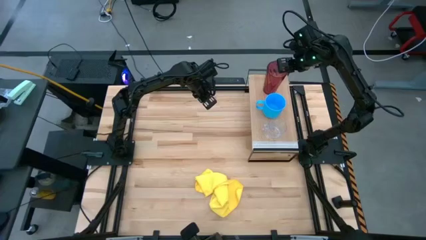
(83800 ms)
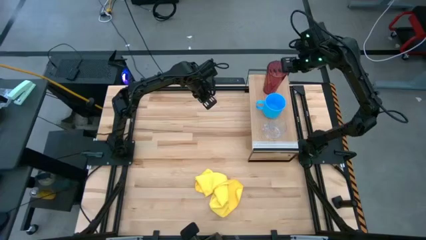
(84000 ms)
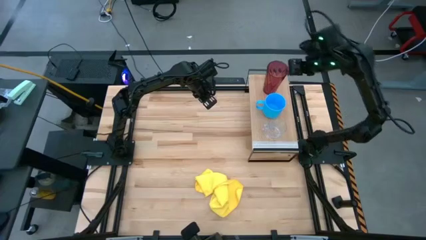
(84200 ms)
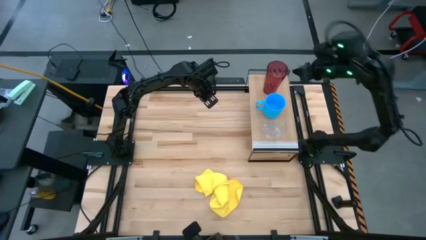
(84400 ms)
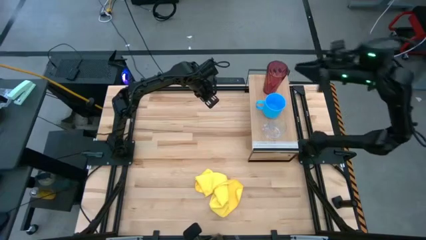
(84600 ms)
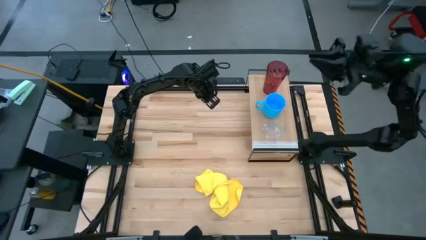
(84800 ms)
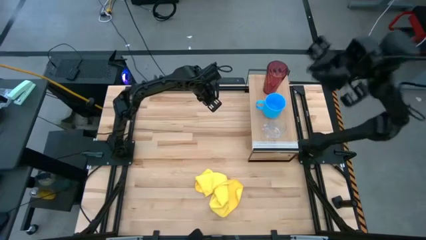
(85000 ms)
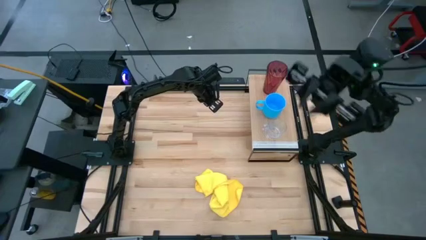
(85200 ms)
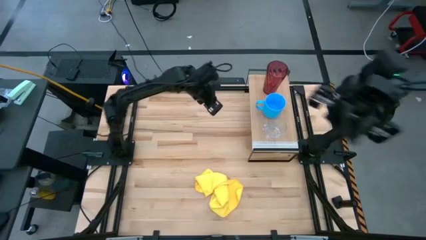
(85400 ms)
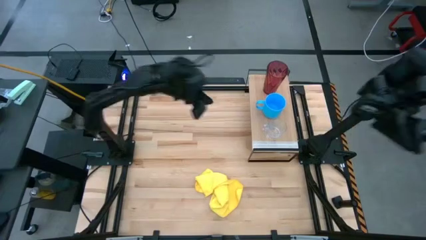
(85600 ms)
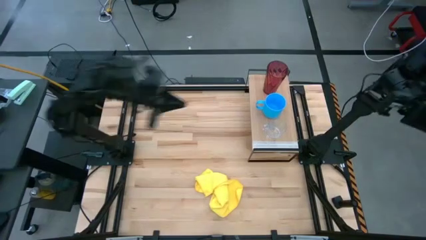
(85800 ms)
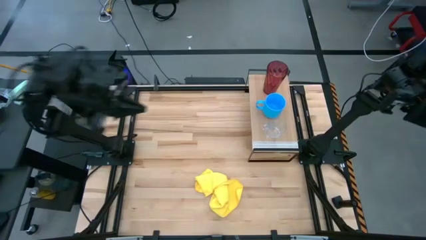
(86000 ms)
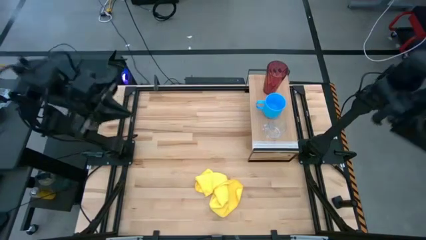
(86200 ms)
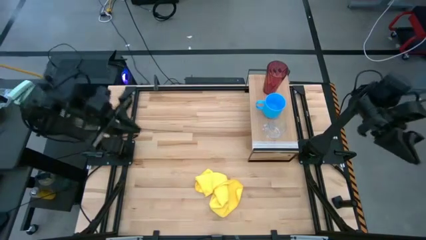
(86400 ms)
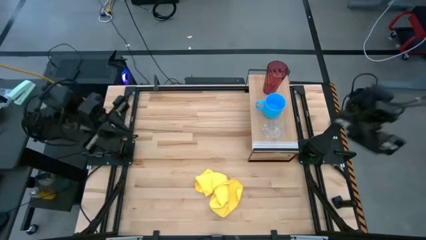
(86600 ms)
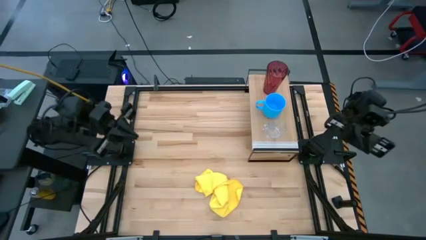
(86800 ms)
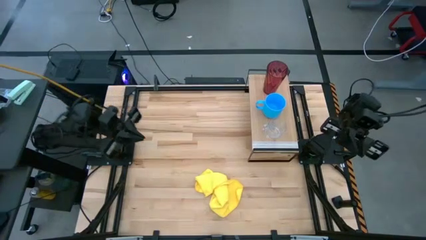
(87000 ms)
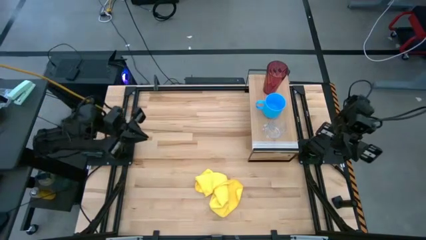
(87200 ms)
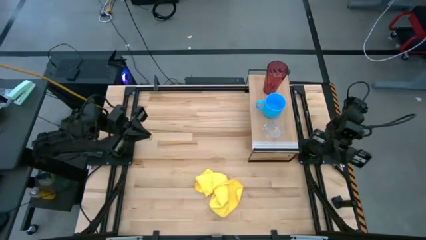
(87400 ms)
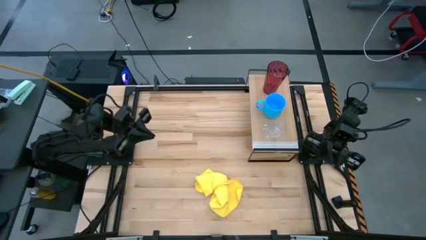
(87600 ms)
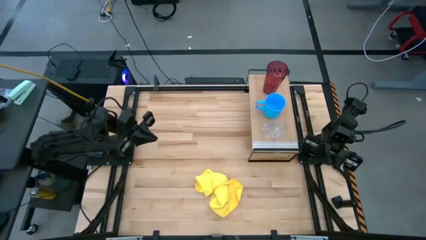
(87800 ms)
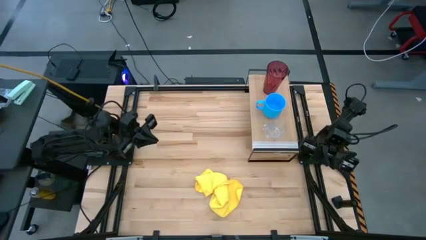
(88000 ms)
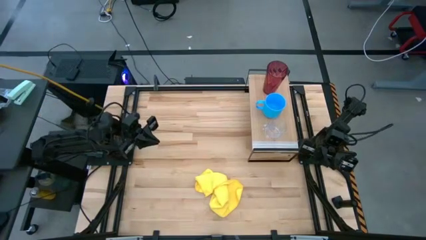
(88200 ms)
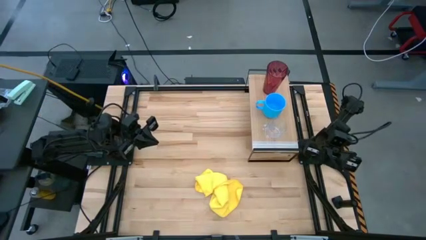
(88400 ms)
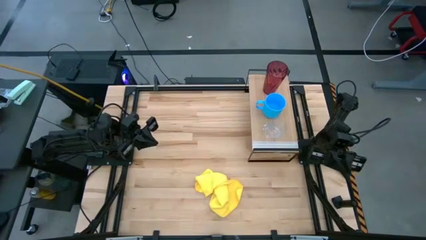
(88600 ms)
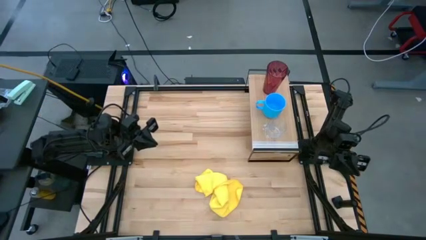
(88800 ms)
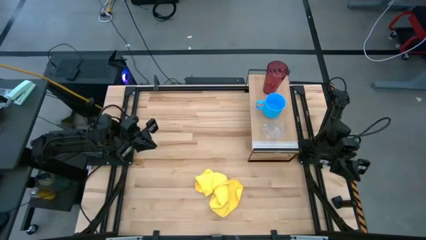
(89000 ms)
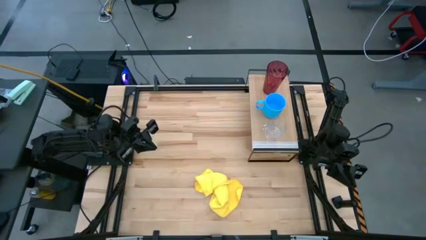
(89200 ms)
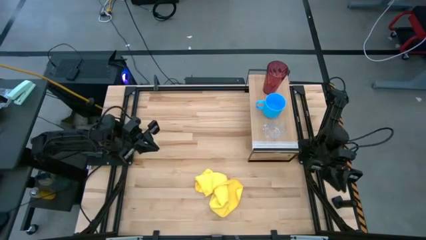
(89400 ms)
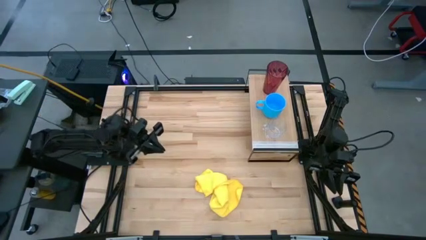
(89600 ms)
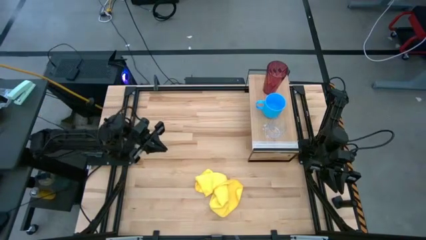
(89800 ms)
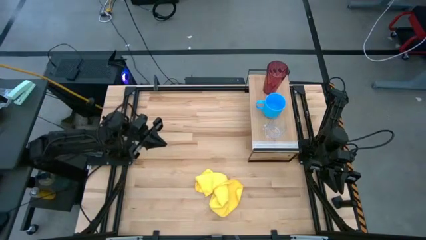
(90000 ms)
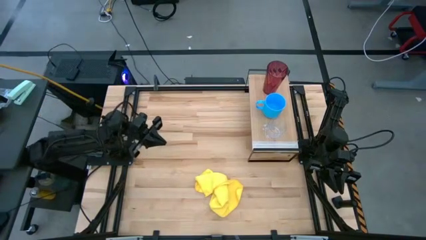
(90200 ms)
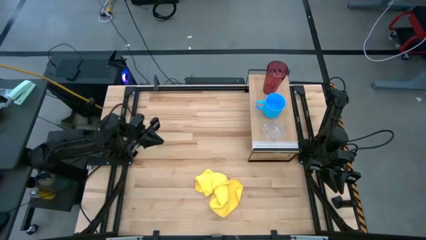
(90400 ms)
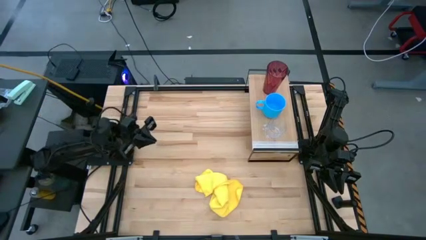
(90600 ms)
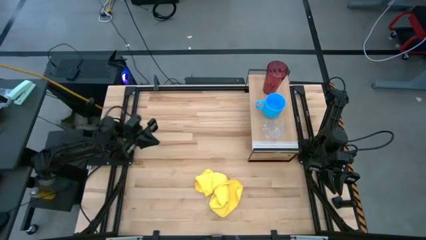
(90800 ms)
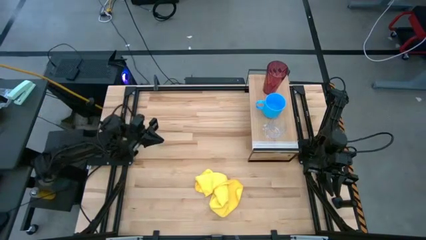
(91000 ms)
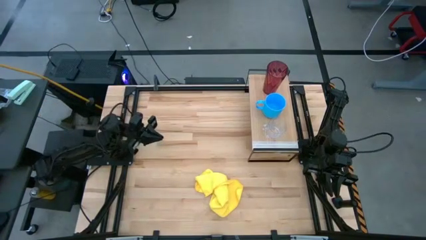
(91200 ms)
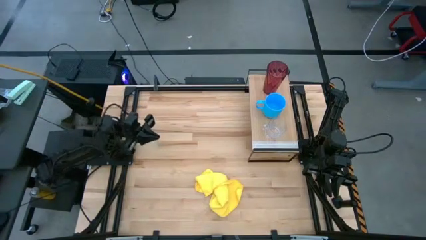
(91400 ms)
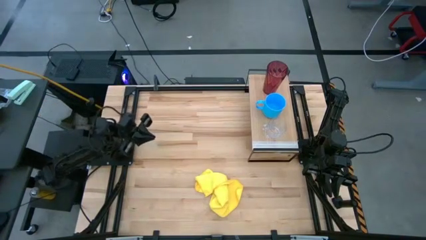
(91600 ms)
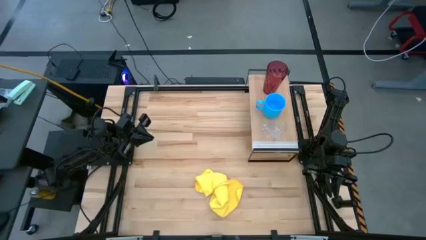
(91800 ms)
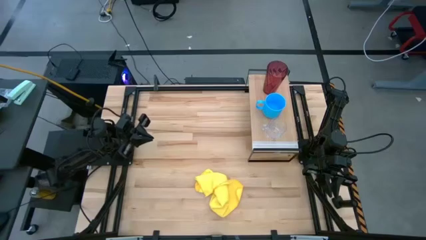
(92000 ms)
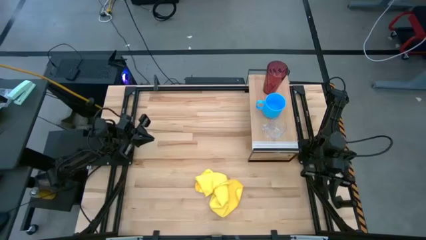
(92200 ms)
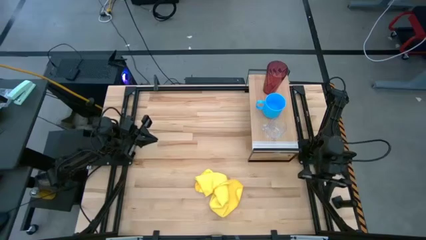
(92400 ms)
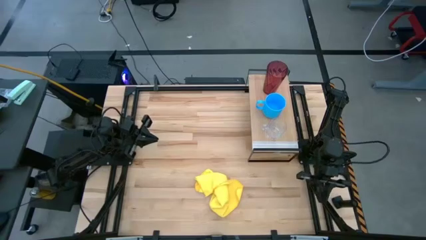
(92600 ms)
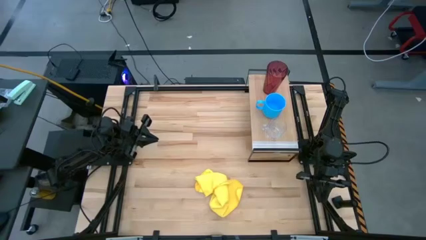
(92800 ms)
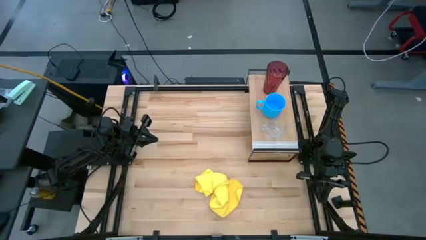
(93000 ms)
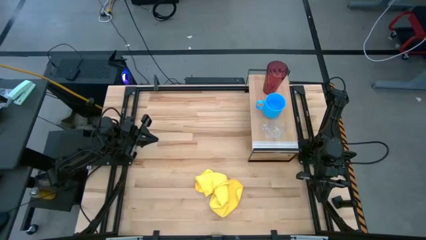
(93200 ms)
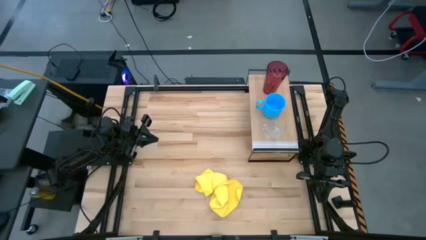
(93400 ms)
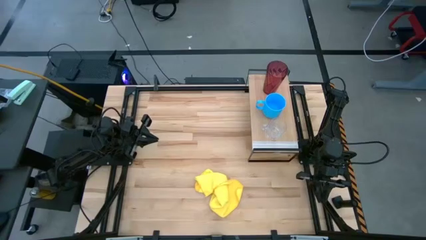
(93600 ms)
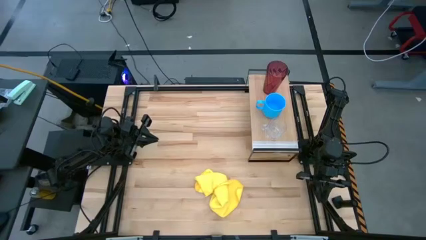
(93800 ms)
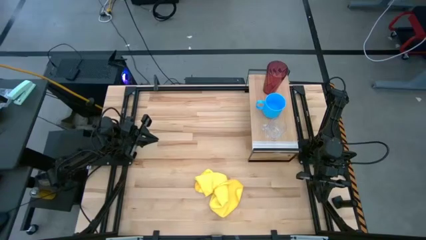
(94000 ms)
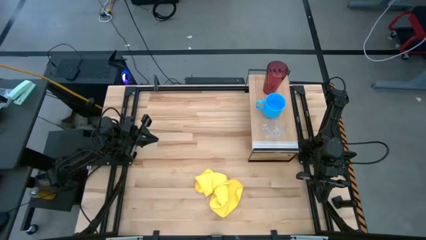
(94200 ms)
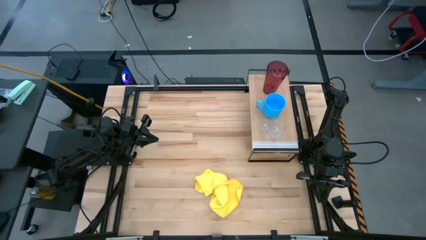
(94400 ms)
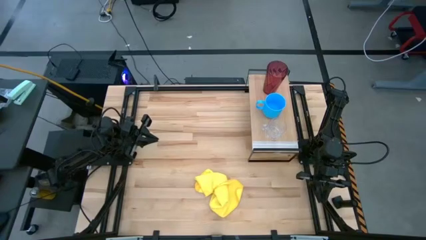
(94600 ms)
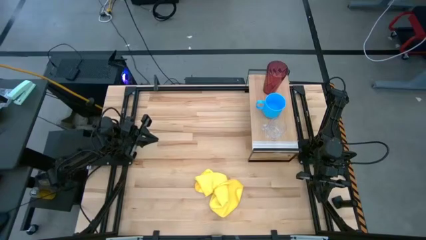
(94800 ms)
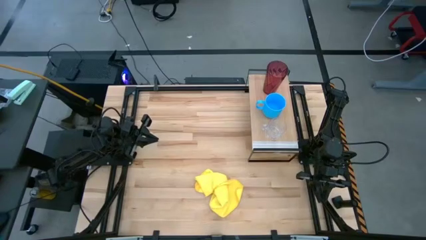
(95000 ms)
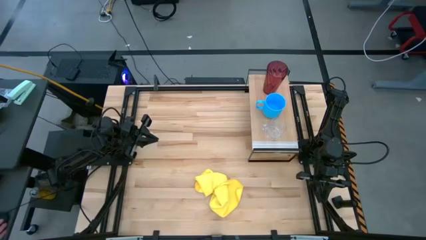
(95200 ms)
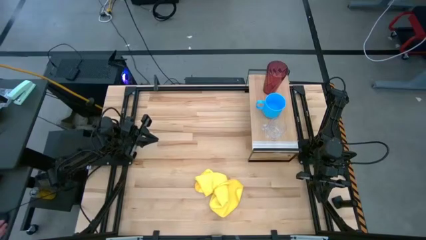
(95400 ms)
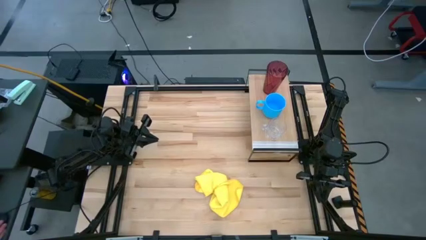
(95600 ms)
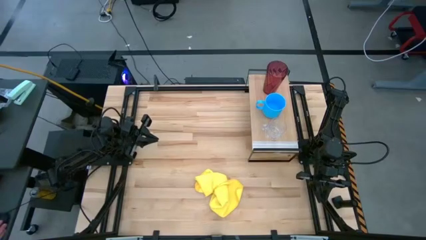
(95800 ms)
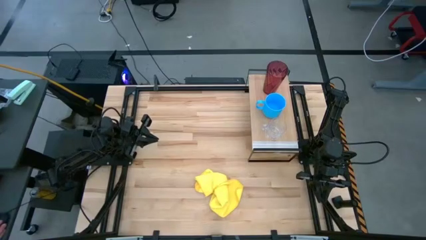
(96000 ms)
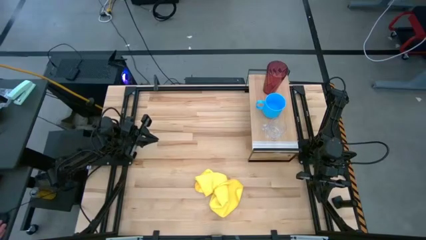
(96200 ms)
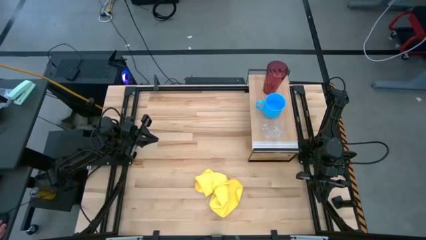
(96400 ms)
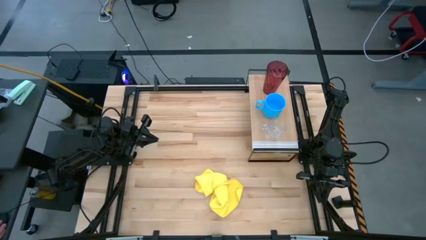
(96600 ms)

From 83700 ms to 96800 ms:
Task: Stack small to large cups/mugs on shelf
Return to Home Position
